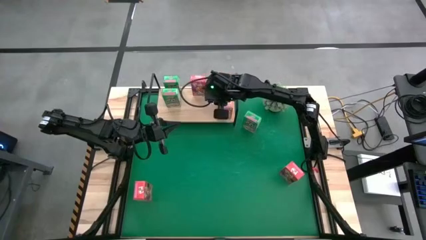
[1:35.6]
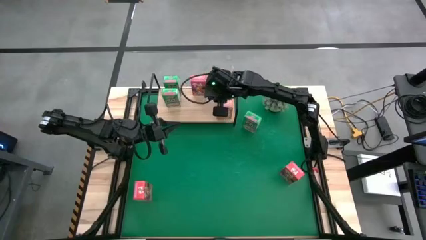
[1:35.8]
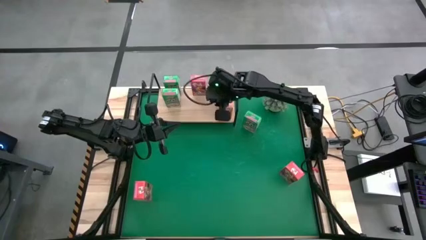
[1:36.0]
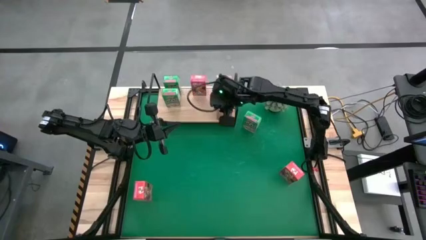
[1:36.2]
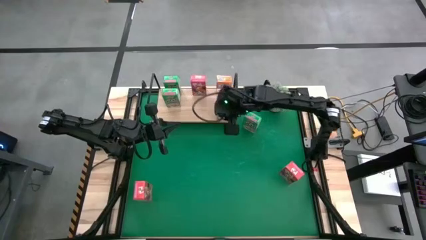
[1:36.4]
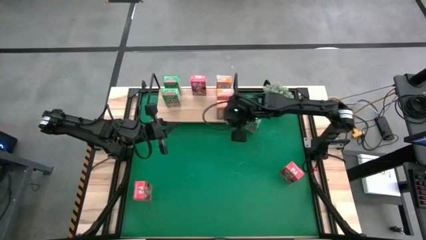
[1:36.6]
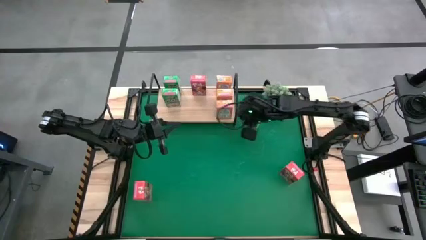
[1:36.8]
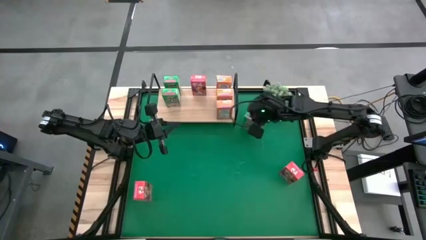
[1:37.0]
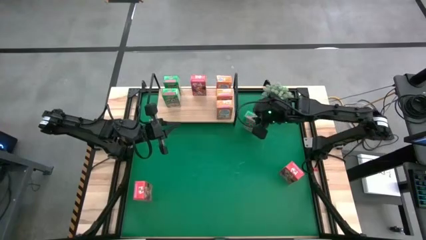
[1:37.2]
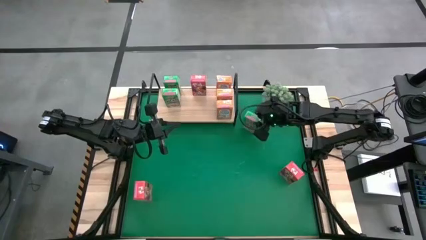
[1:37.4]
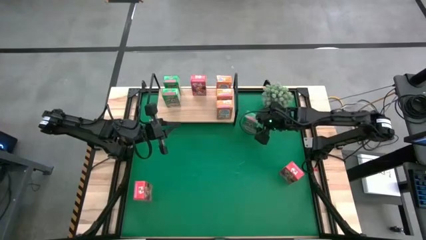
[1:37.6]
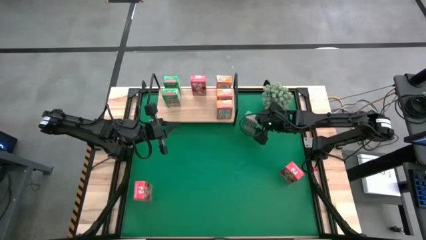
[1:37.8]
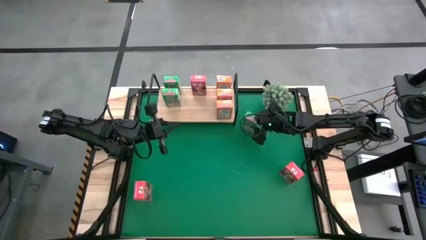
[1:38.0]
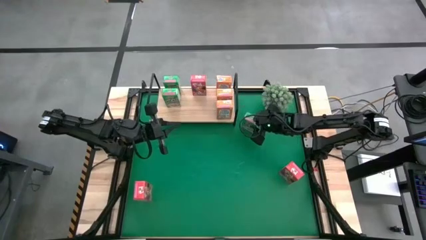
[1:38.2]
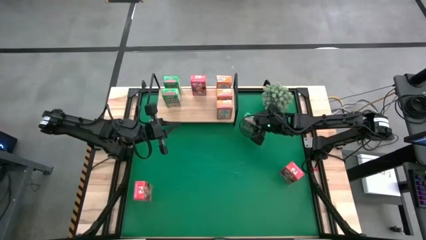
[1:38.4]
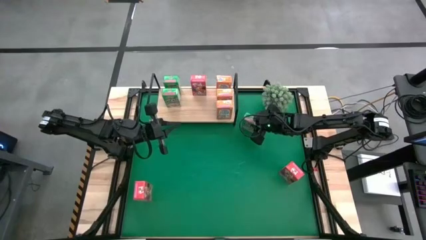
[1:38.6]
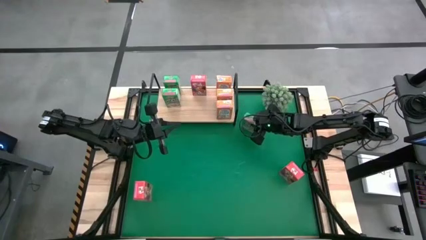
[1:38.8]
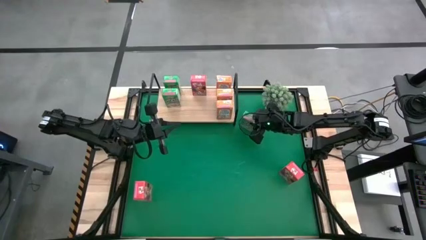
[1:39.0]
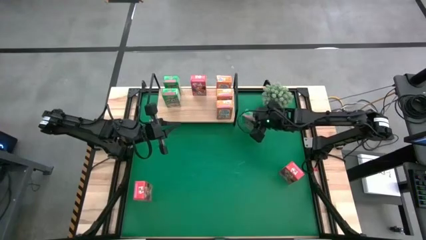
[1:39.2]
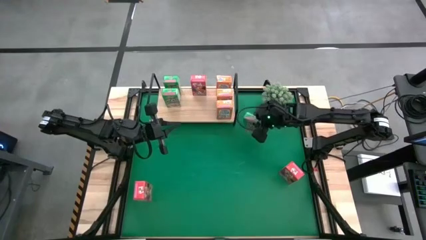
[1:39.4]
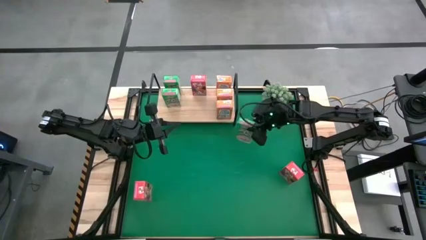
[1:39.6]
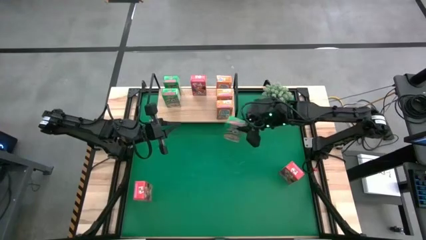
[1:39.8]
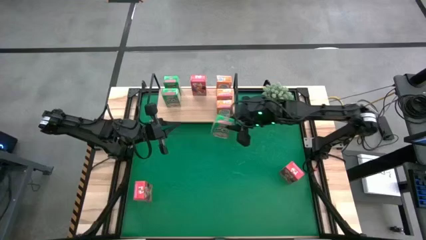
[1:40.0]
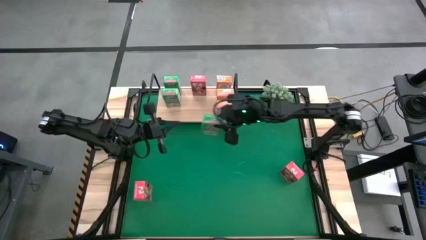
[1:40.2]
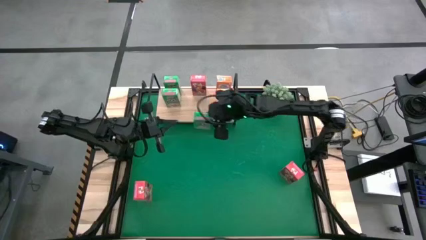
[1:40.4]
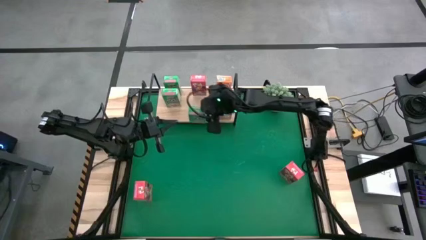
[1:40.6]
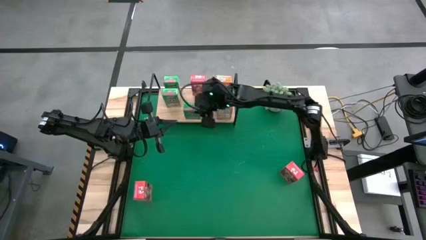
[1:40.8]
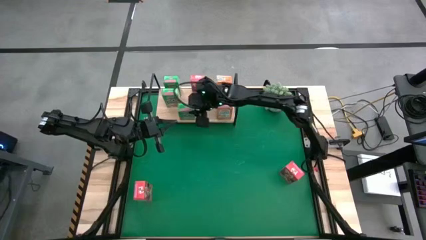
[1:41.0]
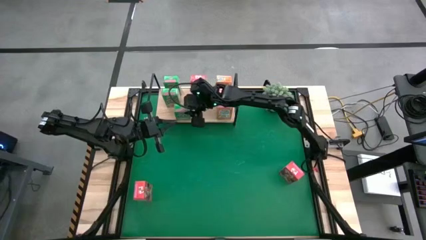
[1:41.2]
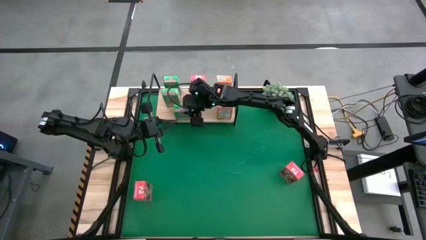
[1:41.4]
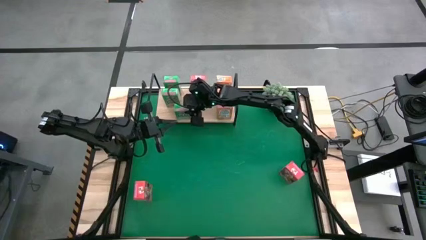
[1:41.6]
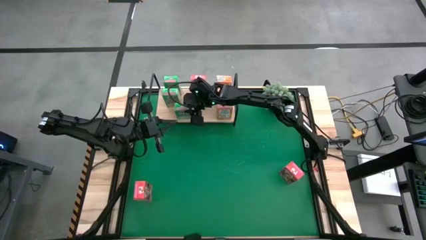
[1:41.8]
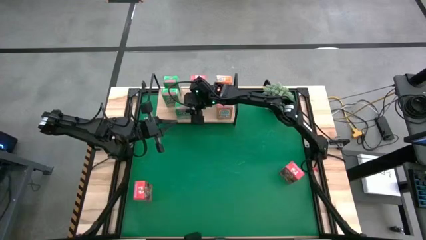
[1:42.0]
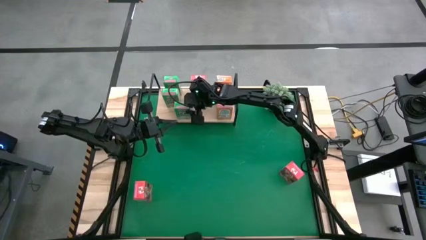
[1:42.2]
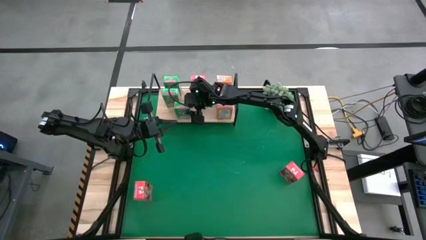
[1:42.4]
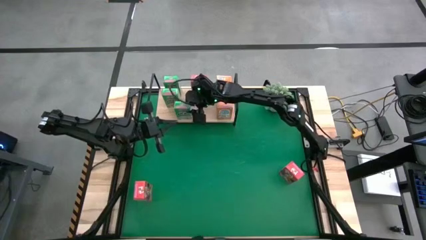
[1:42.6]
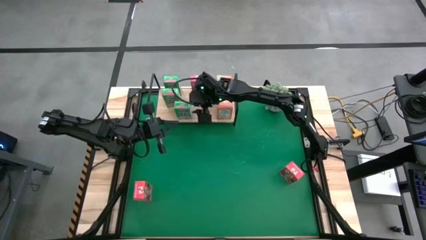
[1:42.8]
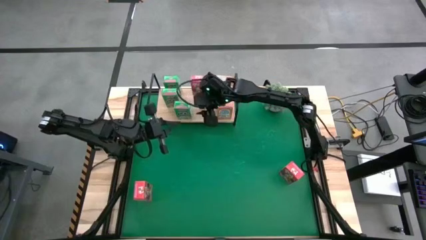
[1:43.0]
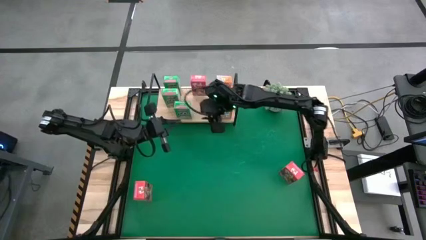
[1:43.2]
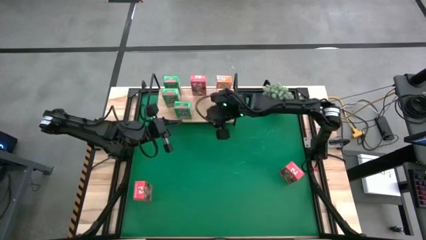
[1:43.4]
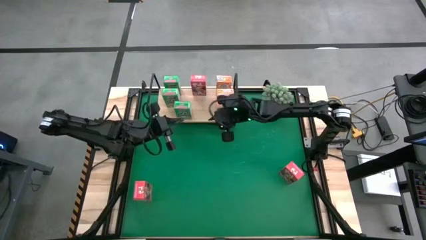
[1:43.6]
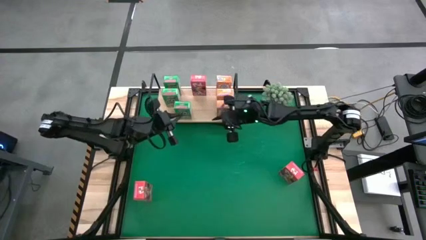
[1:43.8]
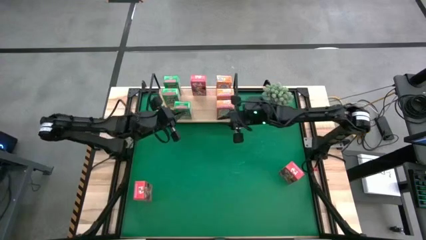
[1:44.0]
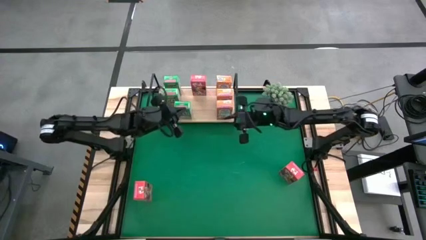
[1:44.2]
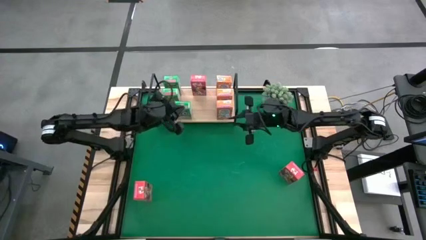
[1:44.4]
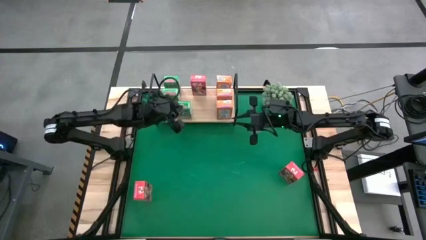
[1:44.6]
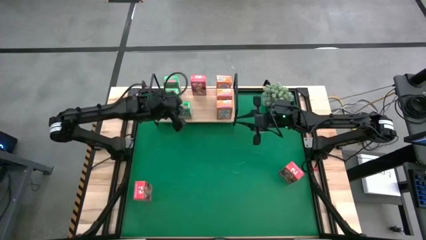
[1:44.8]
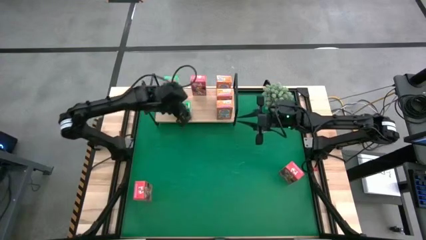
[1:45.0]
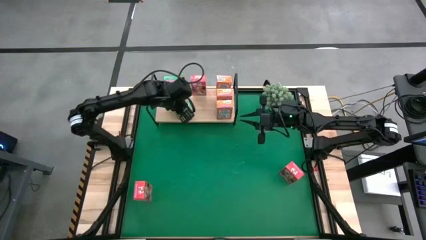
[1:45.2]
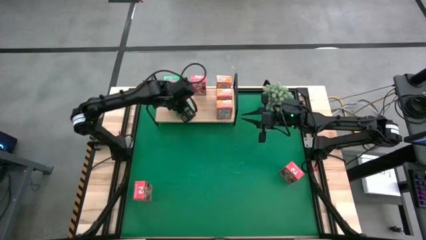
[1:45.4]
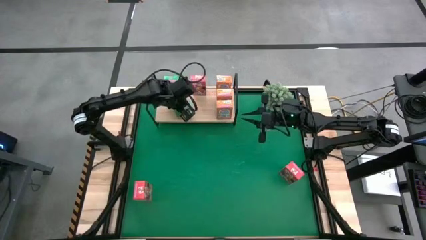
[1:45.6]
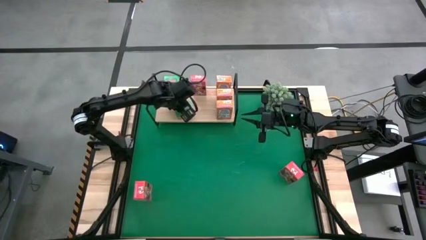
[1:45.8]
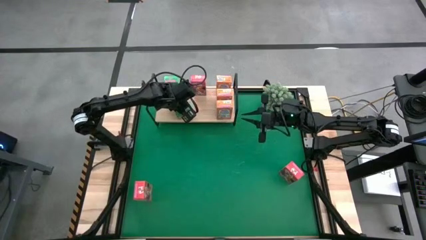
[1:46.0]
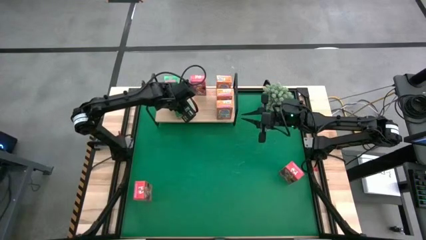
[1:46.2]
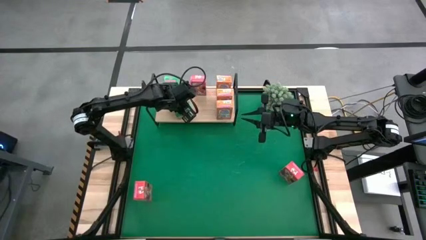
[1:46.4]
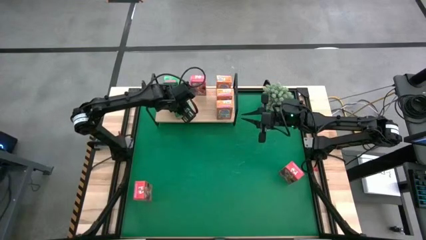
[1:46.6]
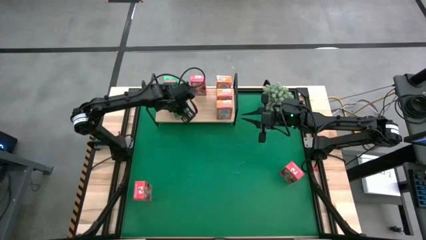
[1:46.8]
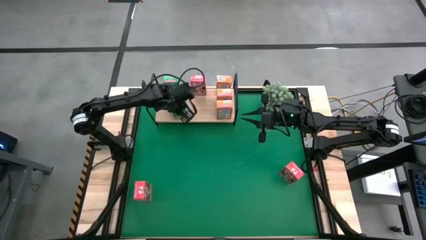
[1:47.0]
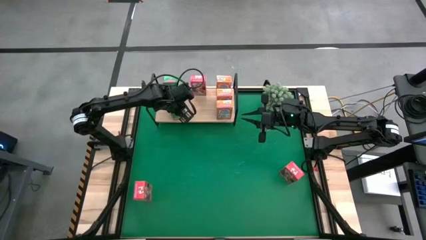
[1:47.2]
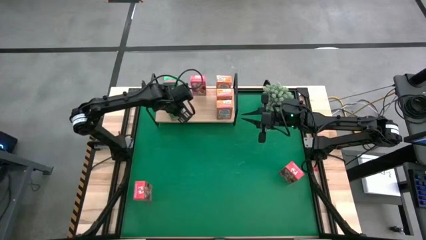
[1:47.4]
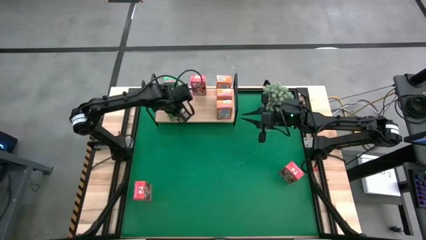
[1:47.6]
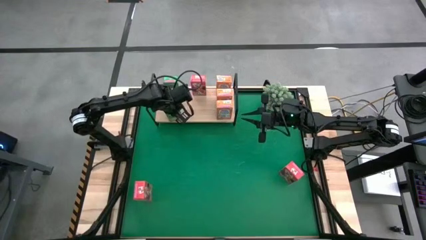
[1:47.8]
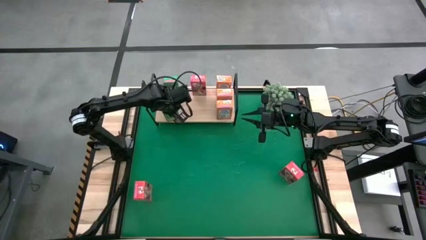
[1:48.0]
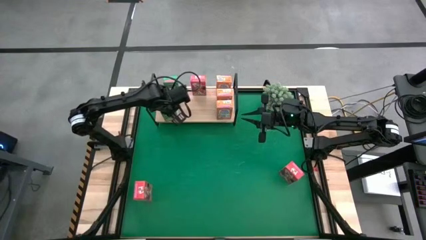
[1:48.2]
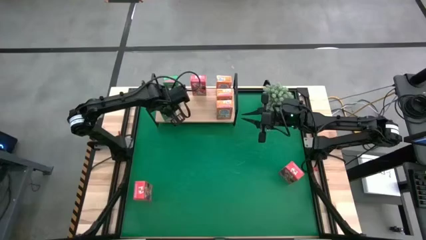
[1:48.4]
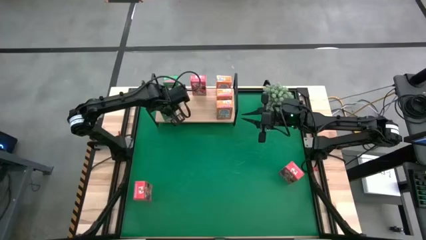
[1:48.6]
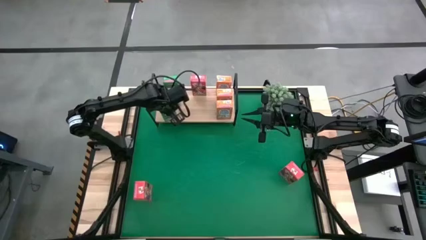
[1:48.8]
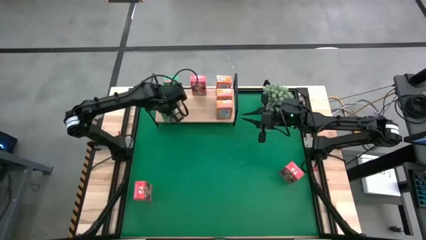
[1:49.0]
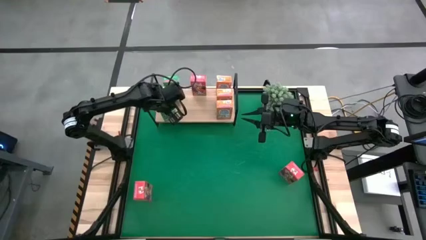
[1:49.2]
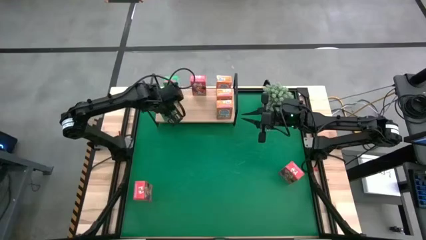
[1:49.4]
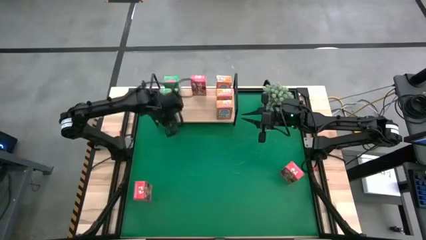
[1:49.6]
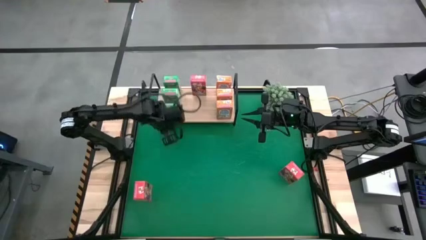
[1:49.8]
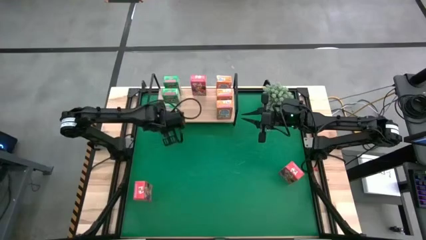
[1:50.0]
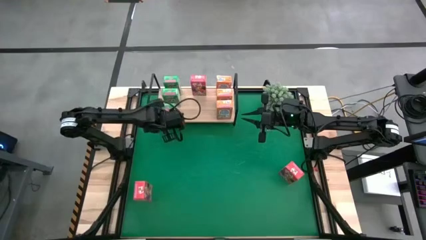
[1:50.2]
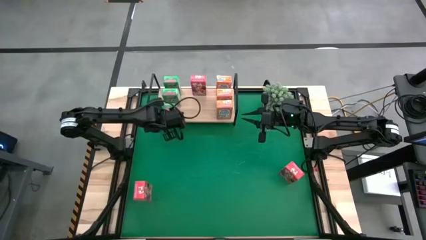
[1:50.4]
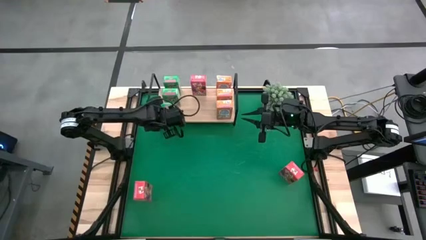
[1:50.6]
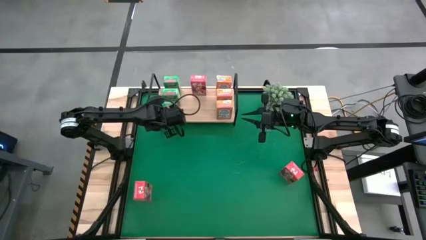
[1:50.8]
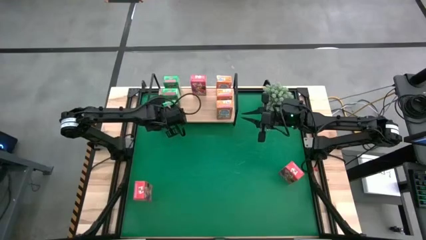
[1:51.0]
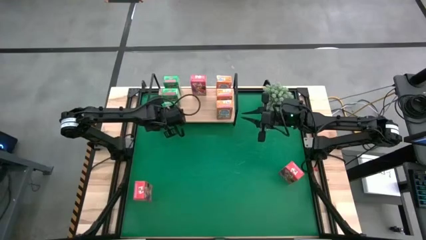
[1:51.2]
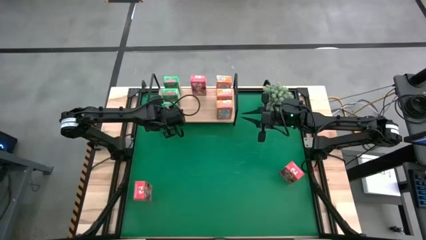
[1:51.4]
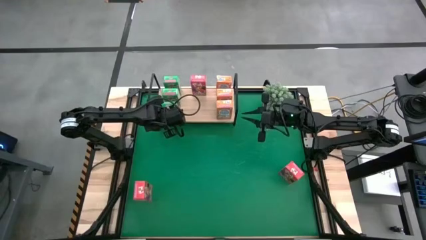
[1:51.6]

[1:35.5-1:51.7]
Task: Stack cereal on shelf
Put the green cereal box aligned with the other green cereal box on the shelf
